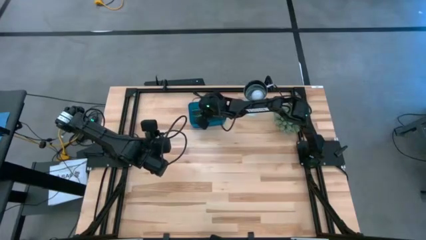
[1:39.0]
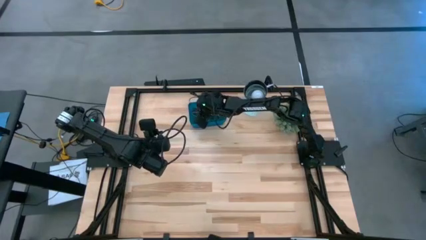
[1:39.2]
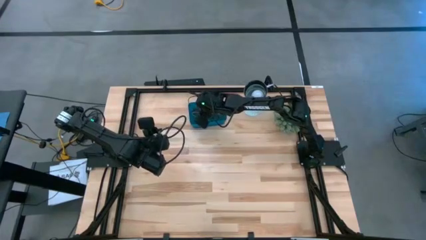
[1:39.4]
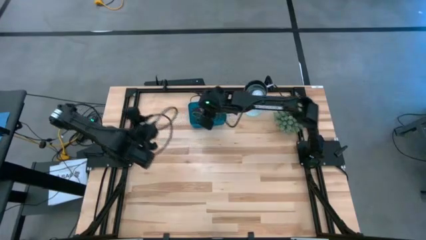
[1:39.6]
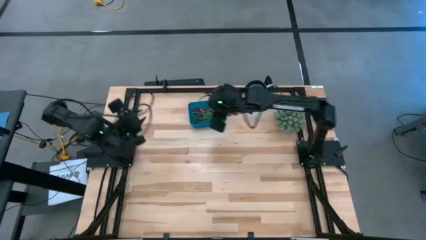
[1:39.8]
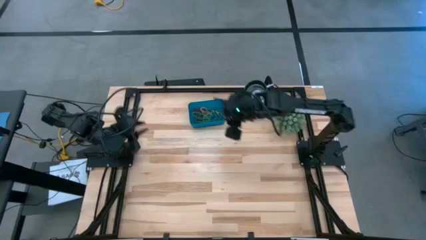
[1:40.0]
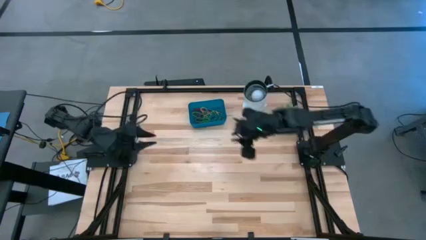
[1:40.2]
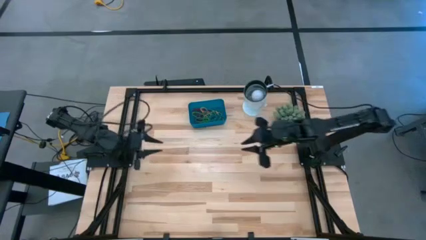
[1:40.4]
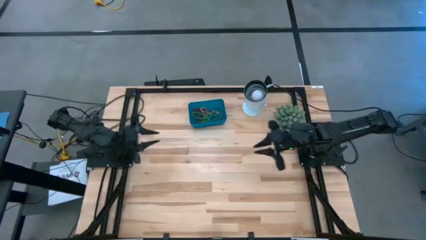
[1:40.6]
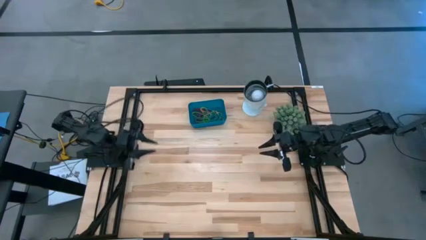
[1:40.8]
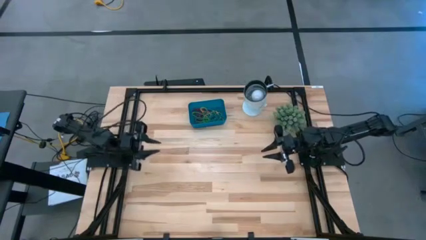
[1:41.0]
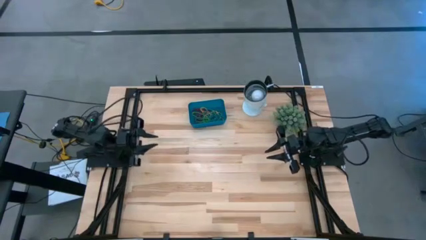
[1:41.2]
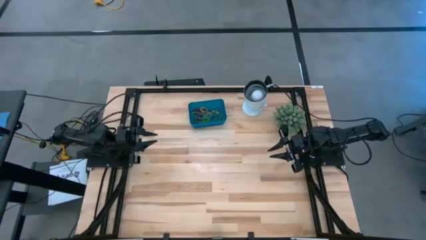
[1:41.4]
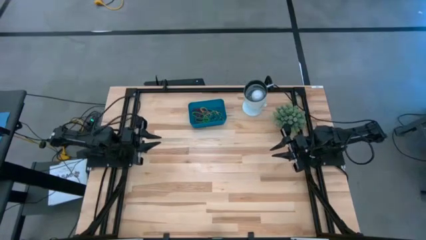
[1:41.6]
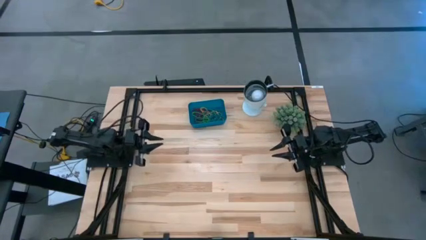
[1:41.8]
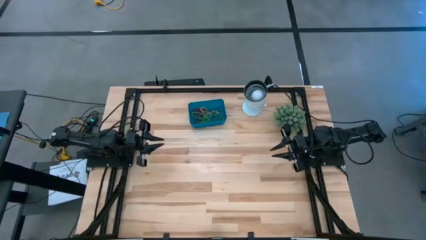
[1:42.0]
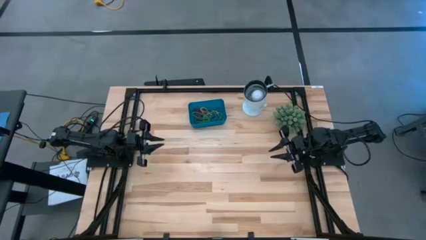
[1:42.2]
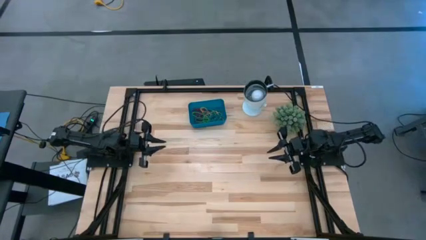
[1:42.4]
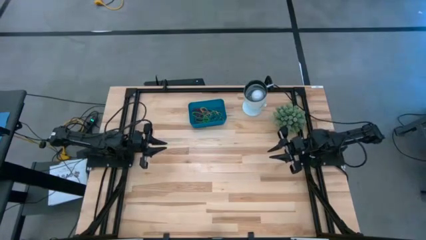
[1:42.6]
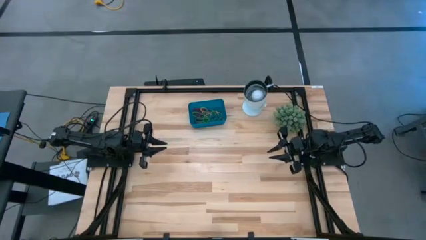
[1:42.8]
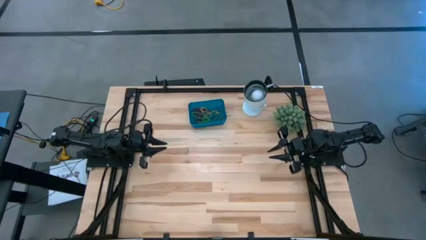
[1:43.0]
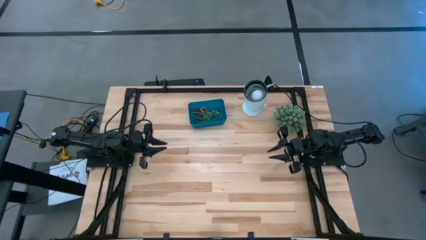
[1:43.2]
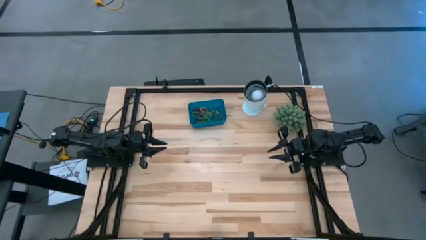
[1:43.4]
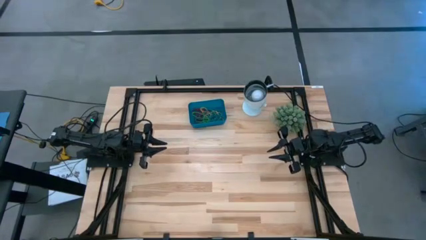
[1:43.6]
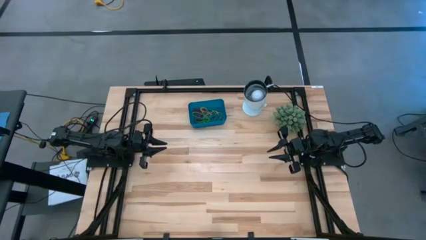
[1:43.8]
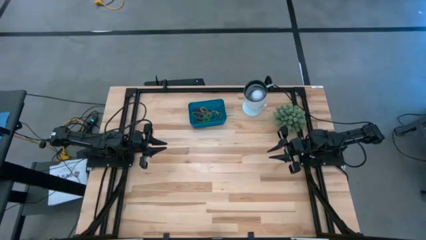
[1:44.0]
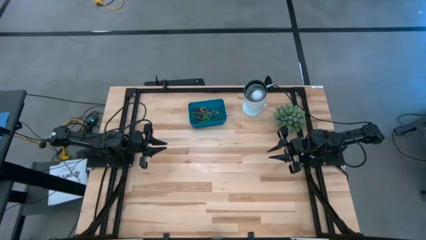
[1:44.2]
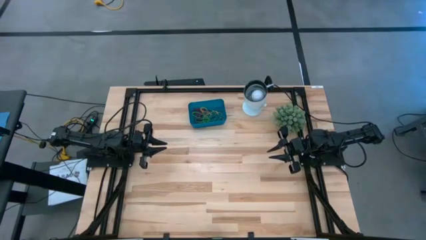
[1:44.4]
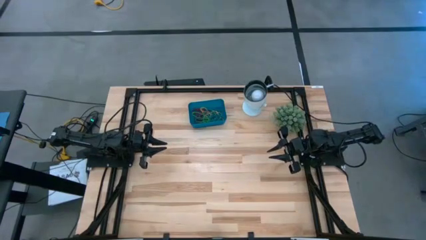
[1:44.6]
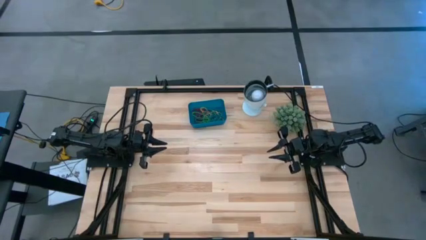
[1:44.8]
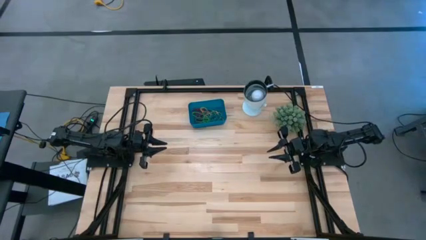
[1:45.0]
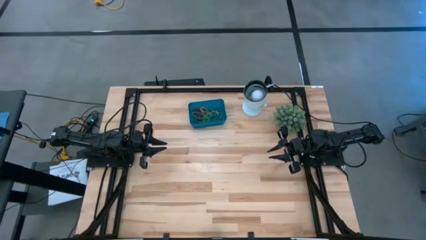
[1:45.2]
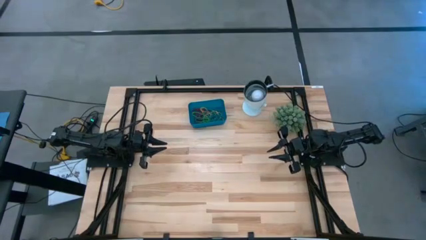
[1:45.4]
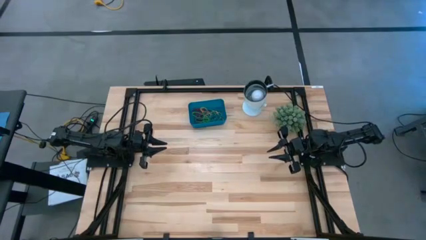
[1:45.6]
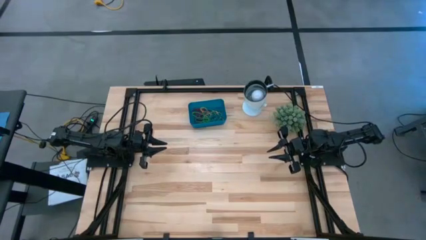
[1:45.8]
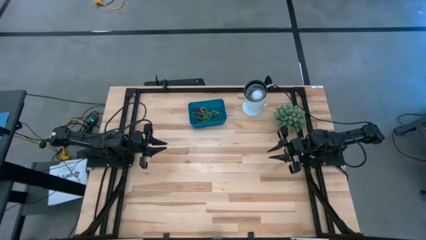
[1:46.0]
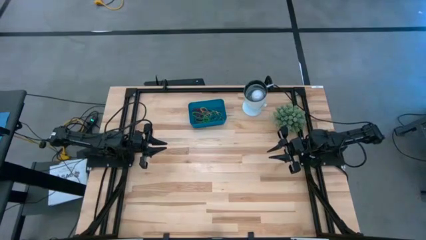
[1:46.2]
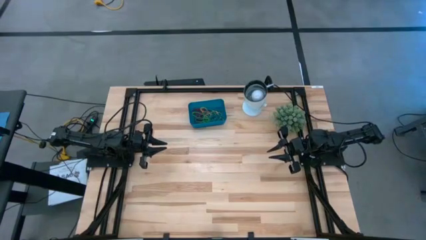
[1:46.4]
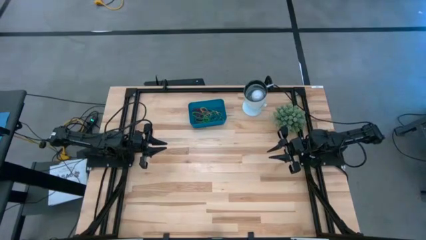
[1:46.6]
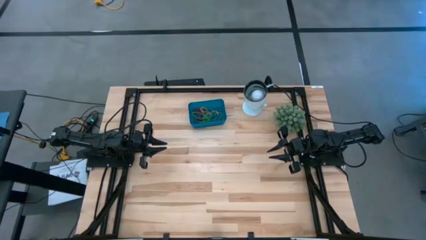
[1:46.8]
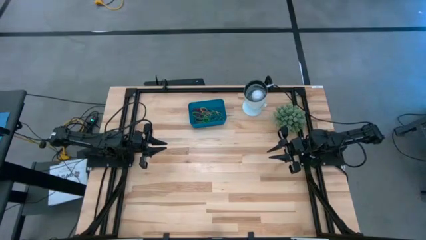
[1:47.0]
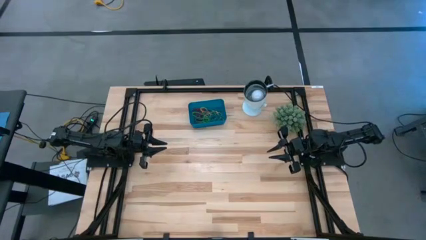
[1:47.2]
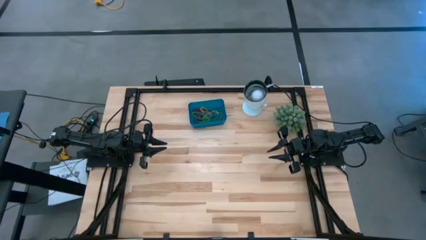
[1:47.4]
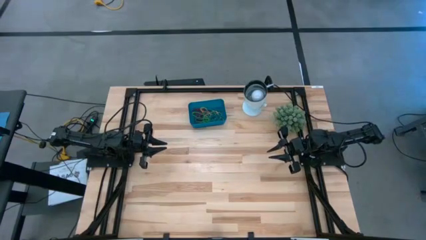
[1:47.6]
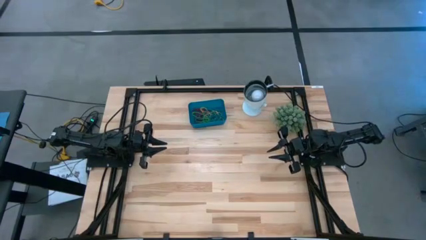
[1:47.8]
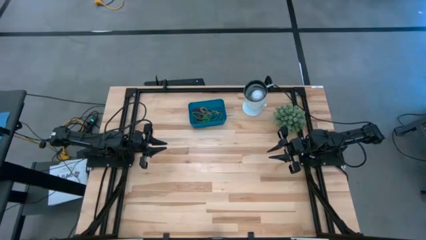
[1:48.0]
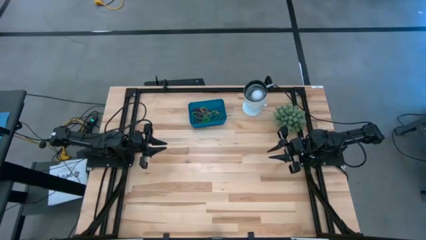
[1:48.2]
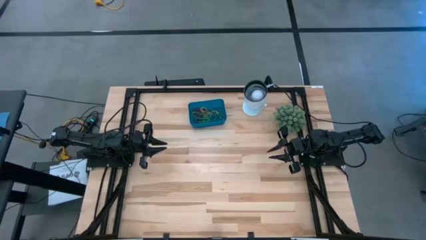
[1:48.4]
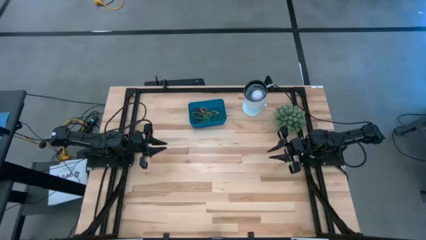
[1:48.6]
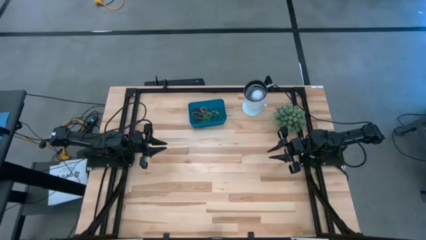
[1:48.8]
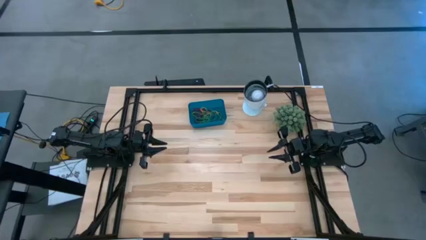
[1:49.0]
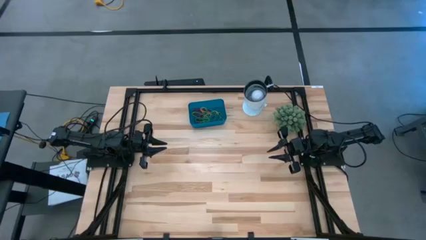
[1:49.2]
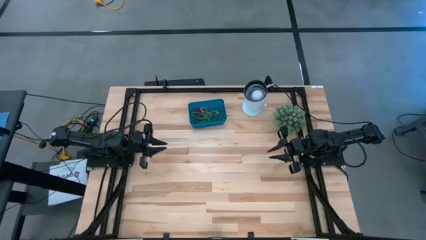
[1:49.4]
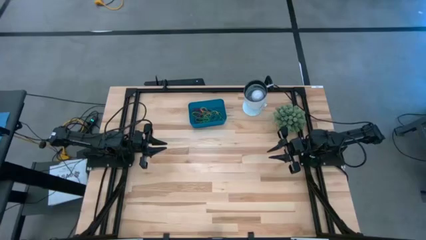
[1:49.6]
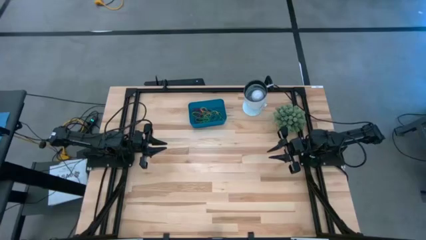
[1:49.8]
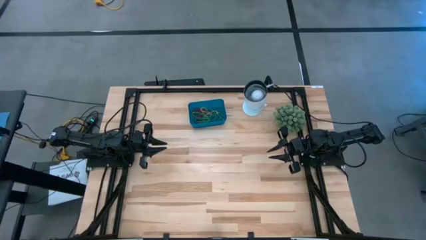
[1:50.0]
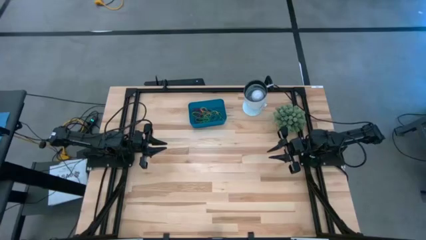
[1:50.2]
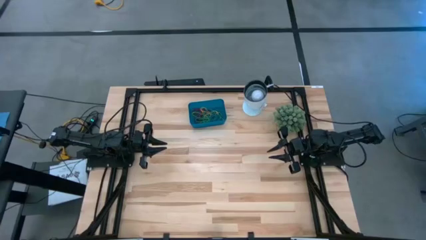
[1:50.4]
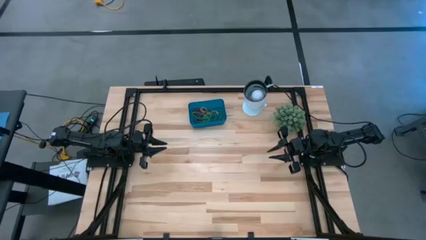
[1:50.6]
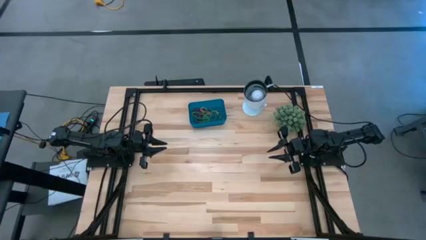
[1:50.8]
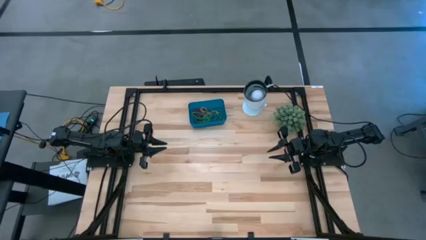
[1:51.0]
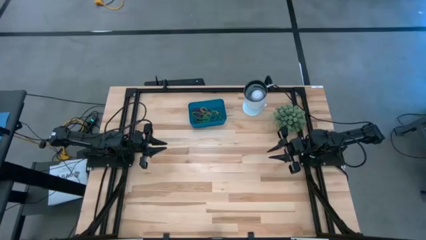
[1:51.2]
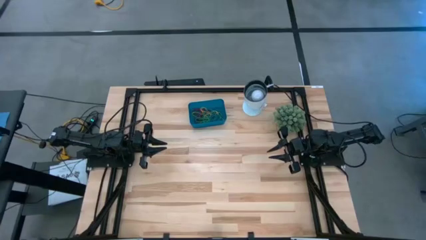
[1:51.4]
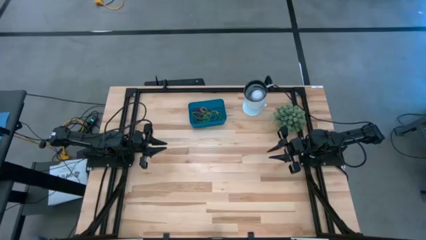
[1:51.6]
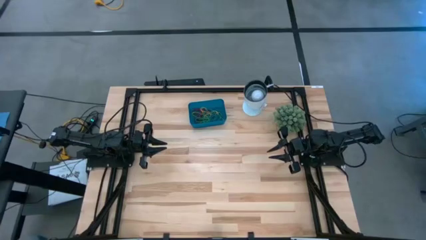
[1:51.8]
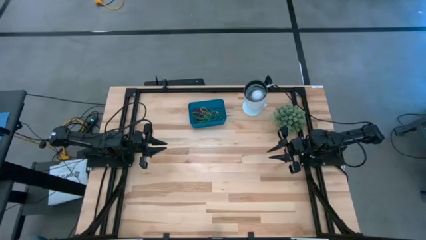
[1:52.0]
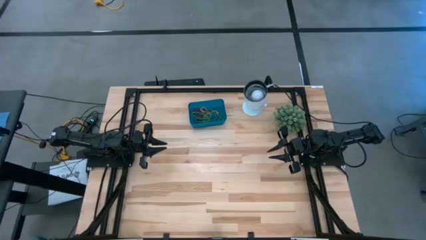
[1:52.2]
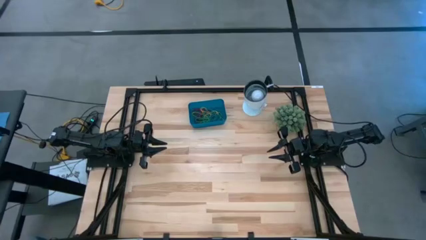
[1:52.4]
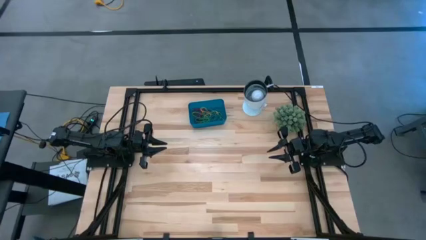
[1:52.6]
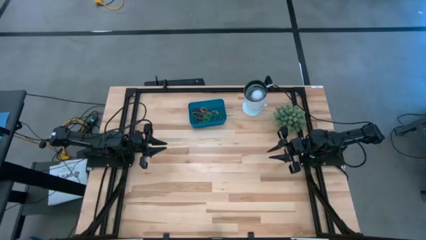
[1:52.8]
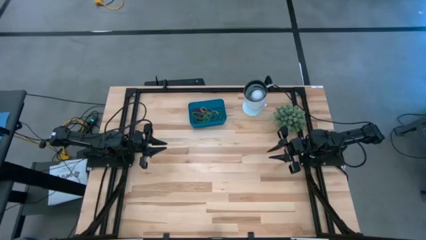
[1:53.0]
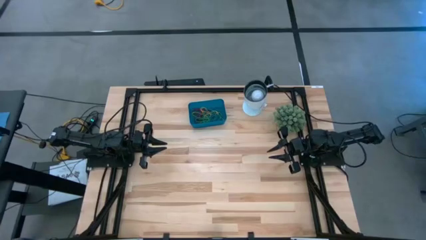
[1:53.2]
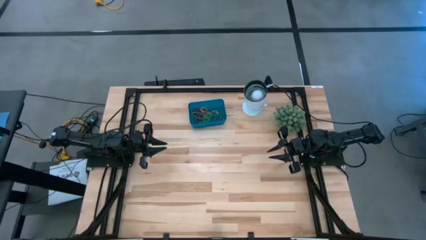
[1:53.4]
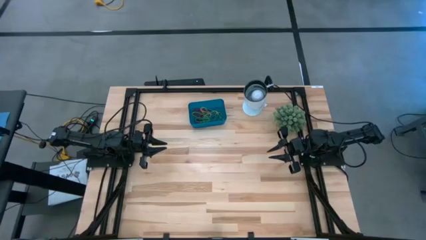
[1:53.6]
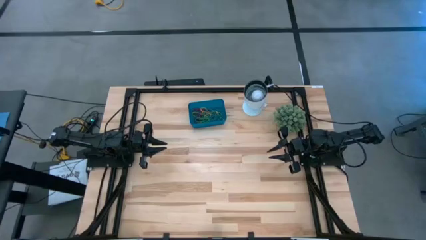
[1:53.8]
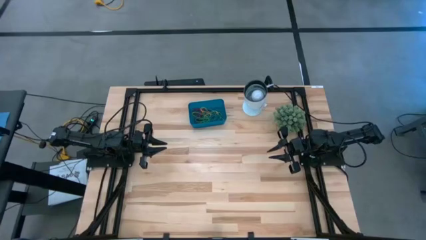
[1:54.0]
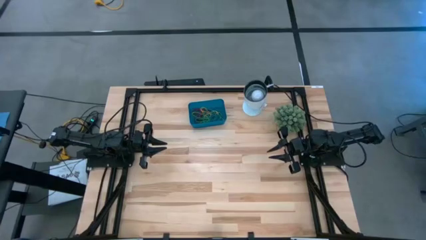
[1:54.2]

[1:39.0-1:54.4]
Task: Pick and place items into bin
Return to Home Position
